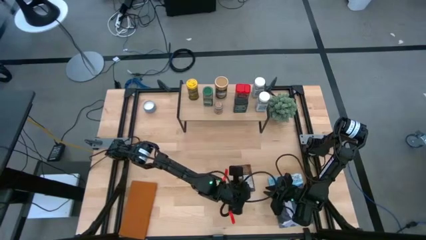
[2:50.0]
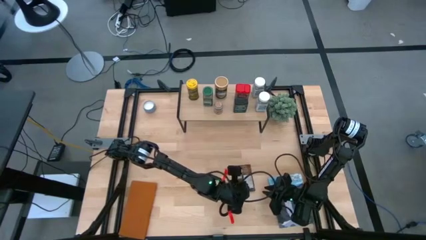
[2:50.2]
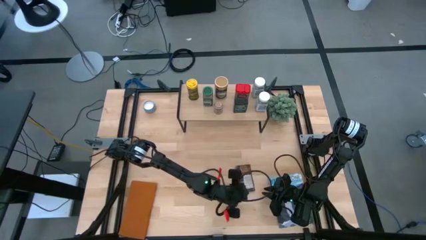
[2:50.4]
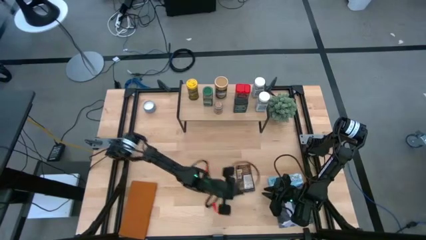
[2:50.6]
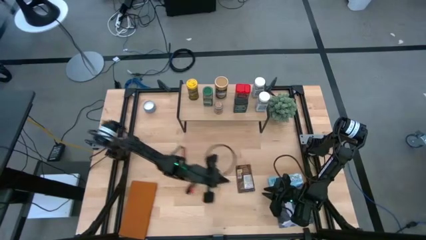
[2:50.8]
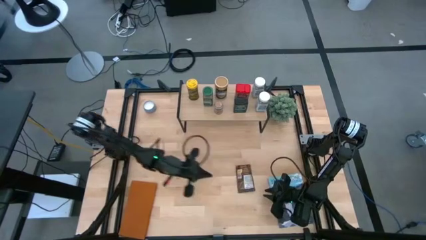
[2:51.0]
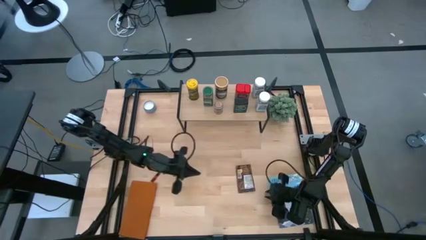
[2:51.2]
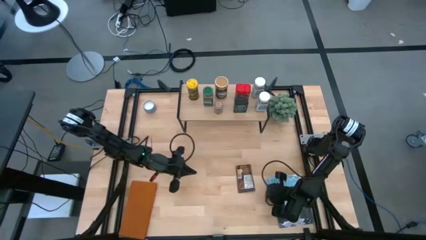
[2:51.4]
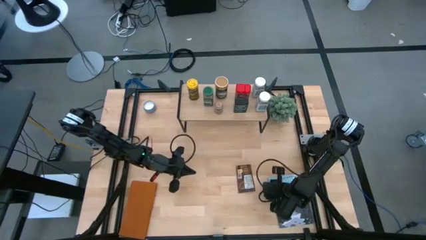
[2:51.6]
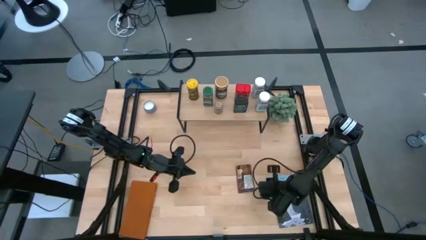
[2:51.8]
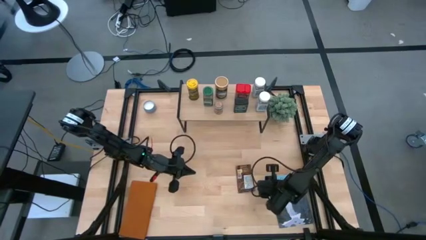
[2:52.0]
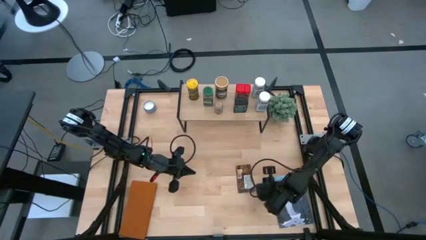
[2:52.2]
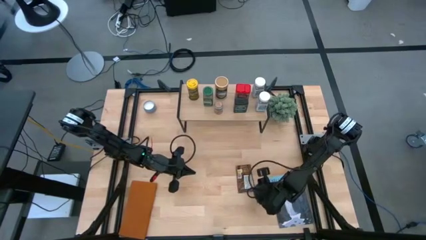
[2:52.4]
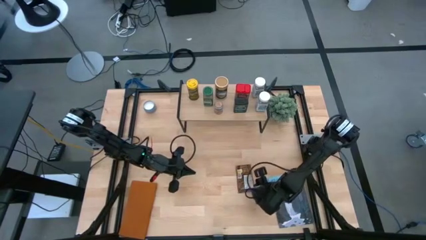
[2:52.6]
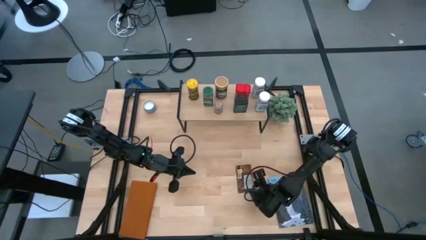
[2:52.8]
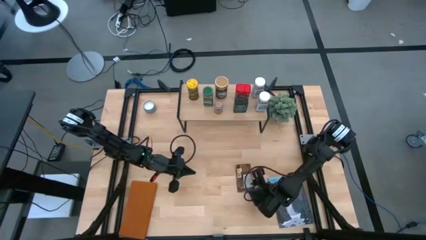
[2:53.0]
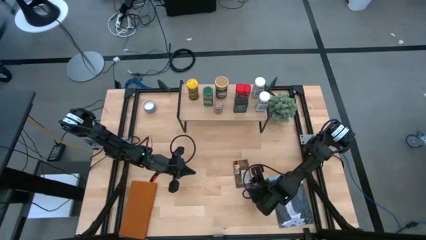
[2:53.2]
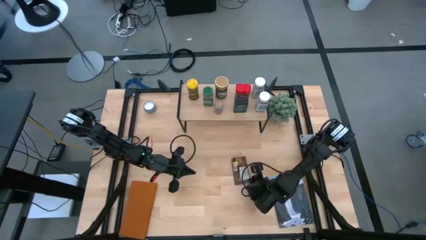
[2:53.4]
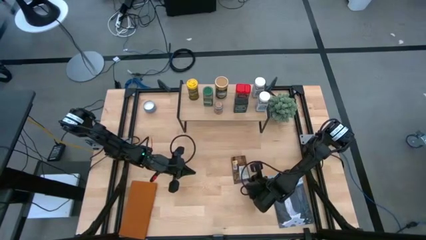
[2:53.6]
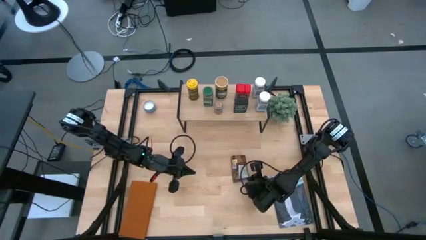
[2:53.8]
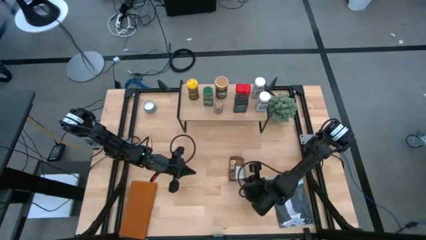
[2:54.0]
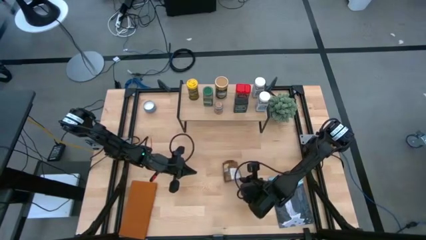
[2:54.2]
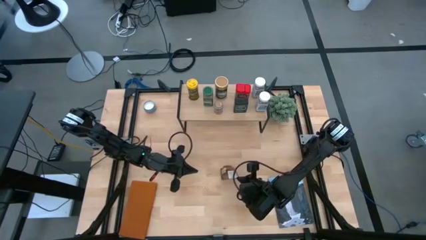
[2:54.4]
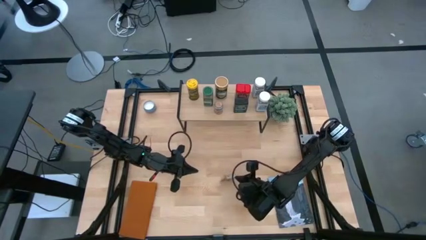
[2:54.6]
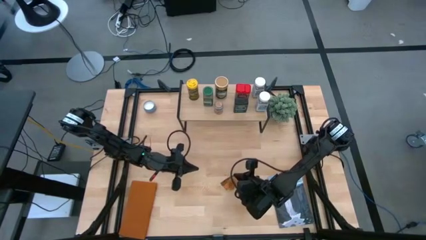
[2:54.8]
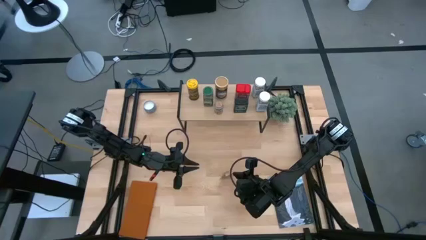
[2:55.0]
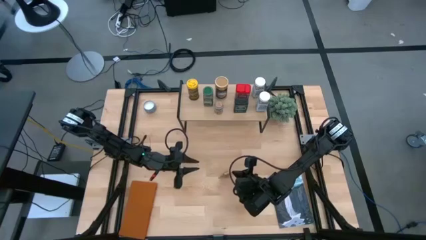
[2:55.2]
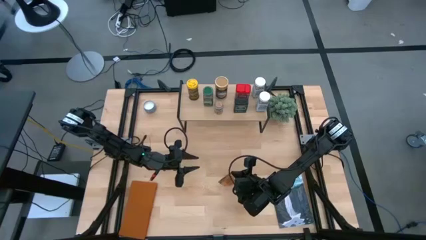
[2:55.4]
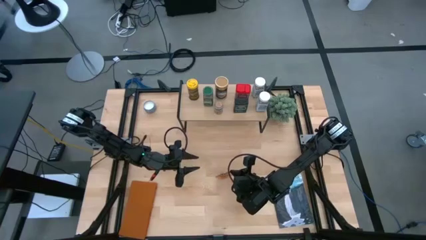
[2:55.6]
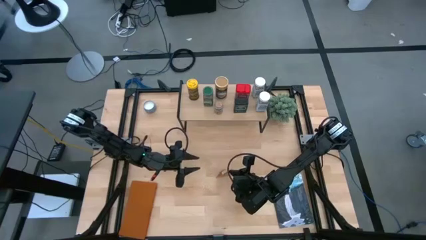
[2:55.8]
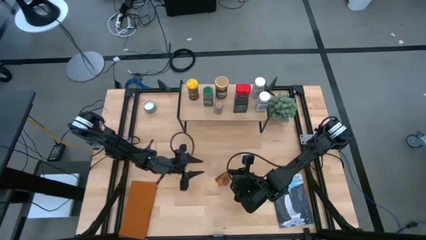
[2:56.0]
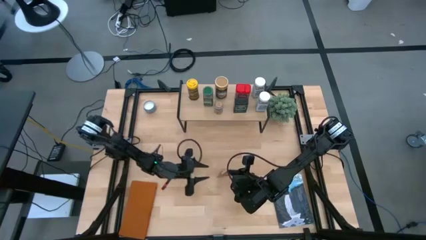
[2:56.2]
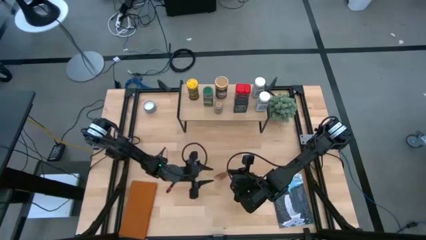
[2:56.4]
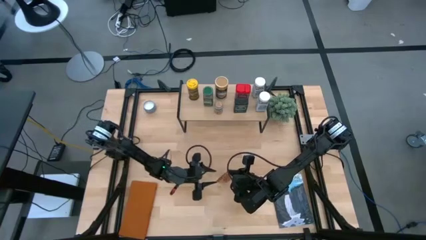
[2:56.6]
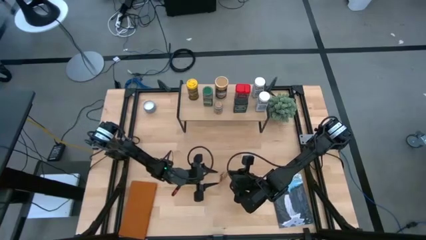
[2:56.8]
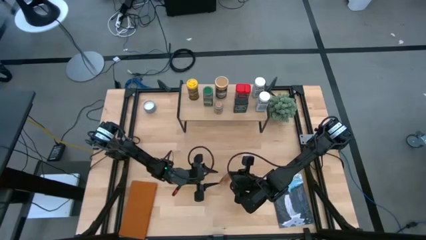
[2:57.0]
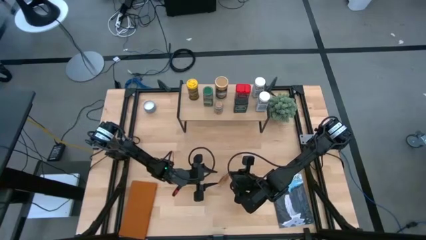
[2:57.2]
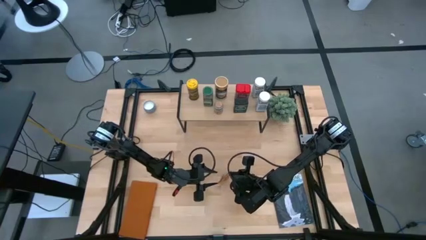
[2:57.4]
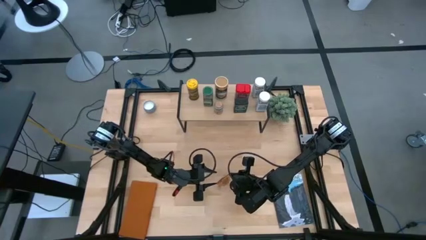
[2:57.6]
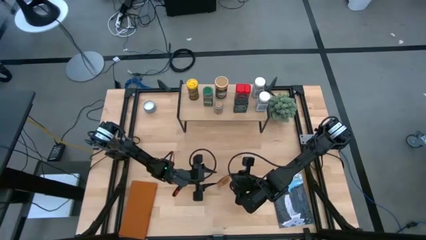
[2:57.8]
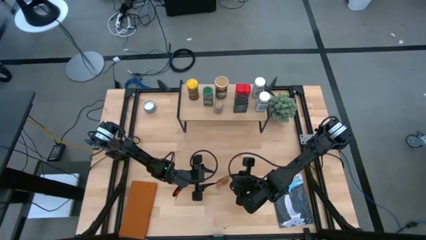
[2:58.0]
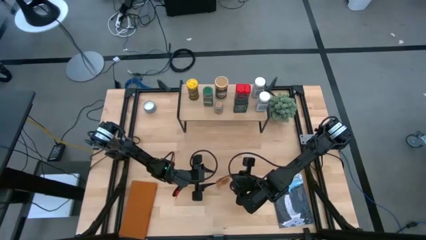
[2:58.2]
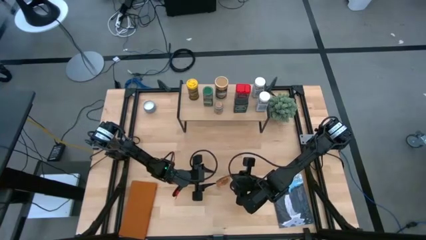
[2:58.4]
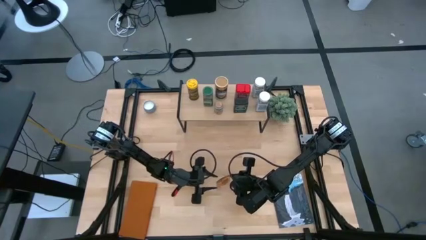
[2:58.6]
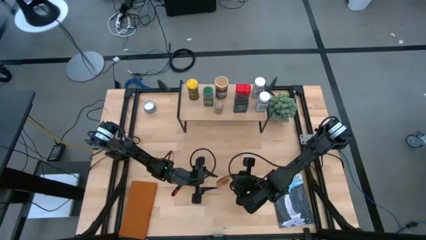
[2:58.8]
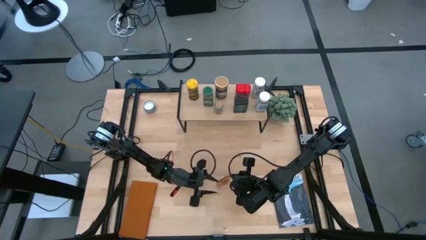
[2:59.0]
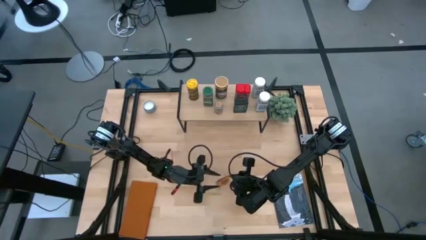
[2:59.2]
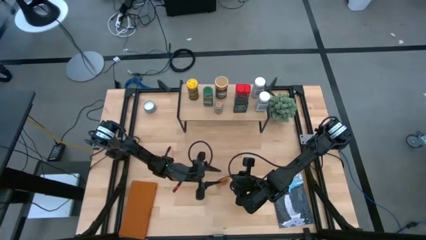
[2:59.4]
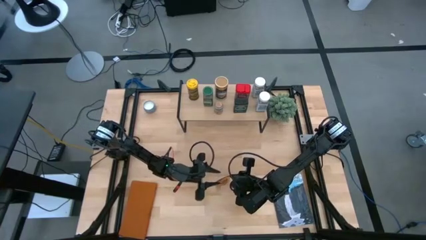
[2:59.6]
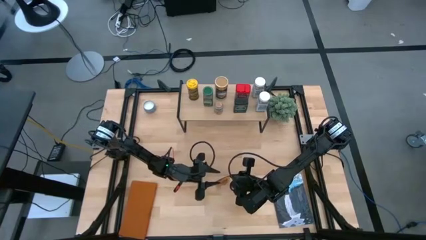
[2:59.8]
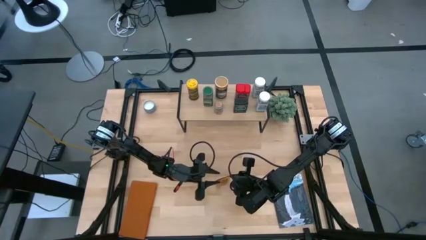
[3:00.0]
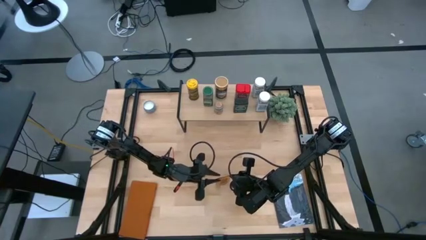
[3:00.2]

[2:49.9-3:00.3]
Task: Shelf spices
Put the brown seasoning bag on the shelf
